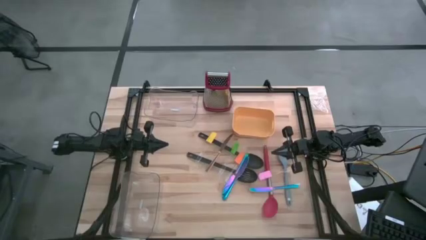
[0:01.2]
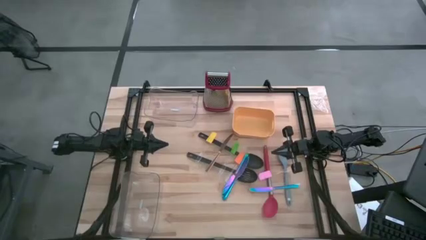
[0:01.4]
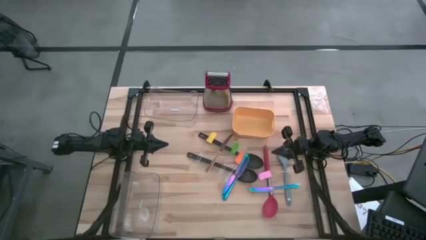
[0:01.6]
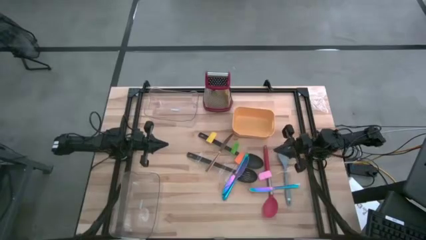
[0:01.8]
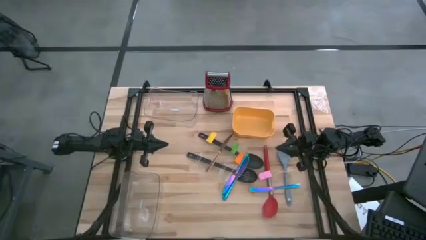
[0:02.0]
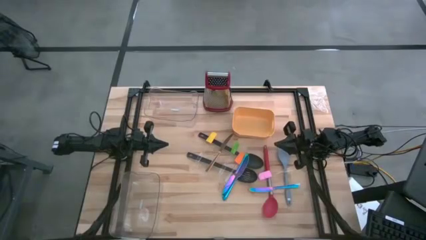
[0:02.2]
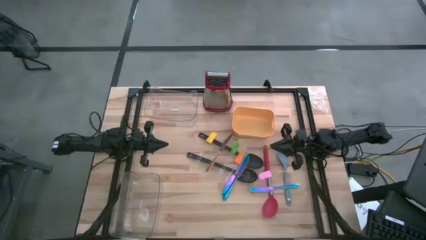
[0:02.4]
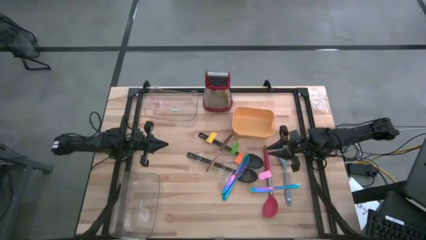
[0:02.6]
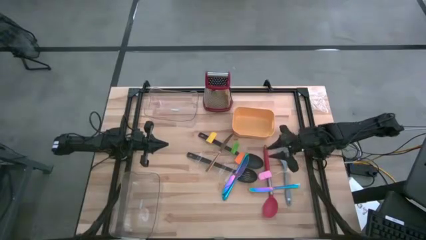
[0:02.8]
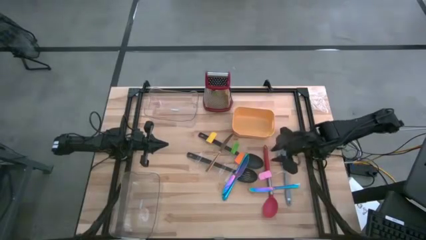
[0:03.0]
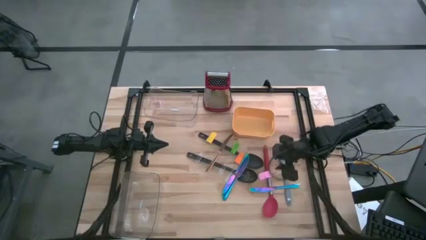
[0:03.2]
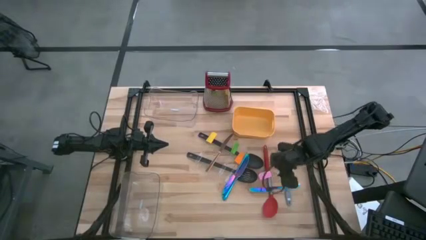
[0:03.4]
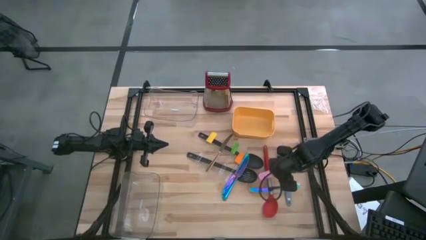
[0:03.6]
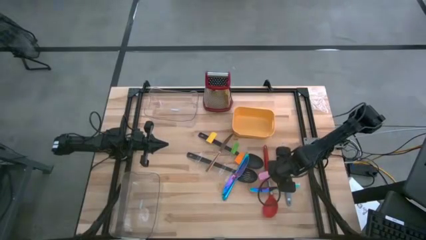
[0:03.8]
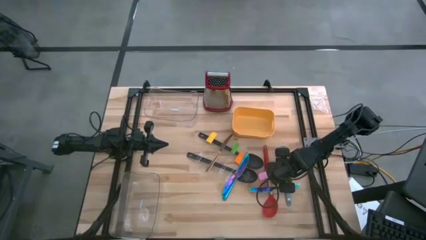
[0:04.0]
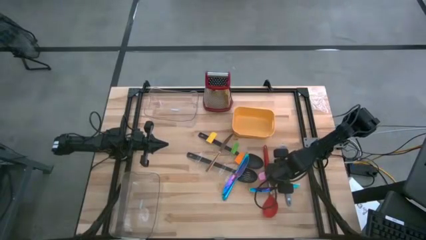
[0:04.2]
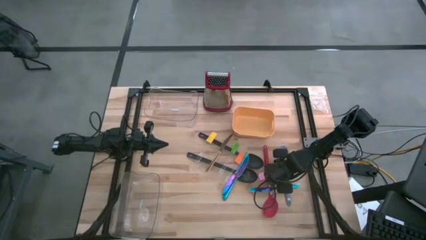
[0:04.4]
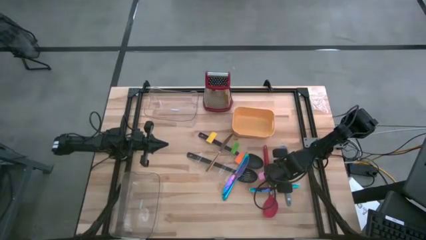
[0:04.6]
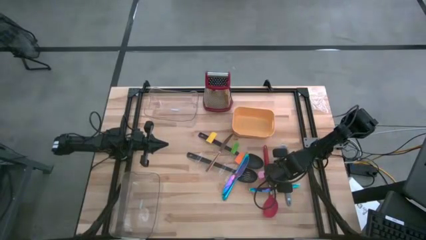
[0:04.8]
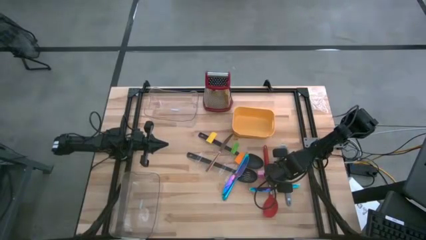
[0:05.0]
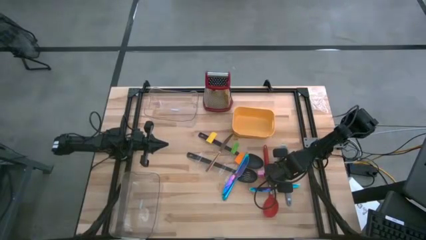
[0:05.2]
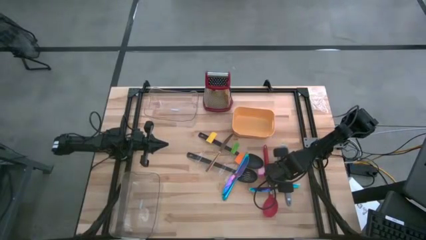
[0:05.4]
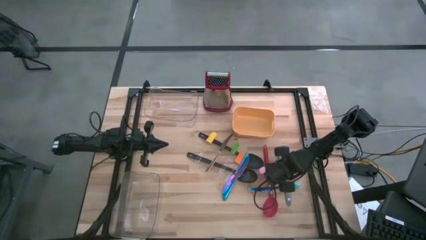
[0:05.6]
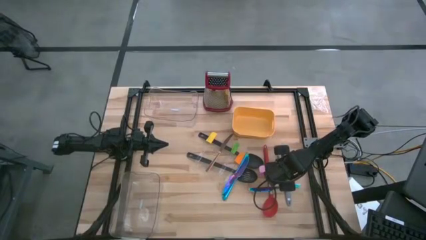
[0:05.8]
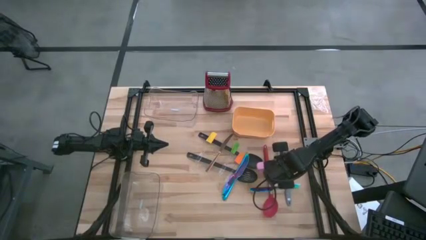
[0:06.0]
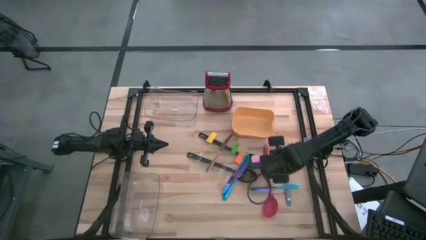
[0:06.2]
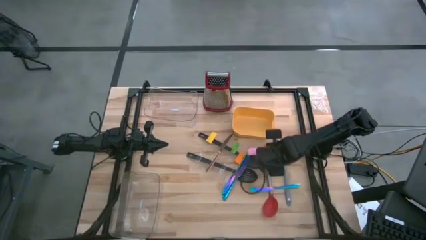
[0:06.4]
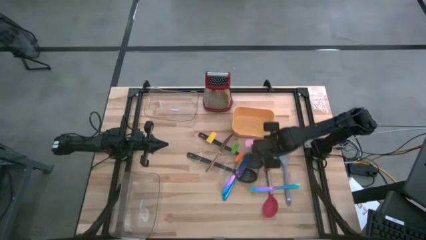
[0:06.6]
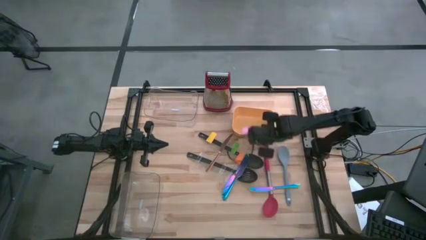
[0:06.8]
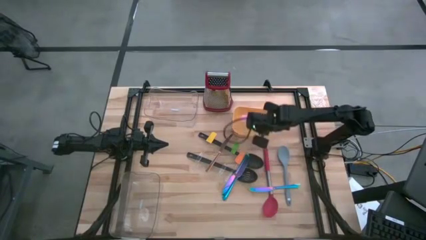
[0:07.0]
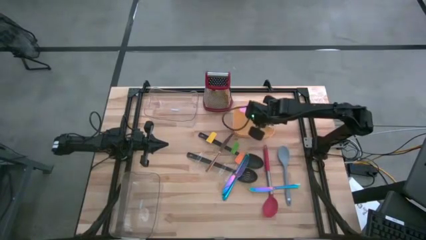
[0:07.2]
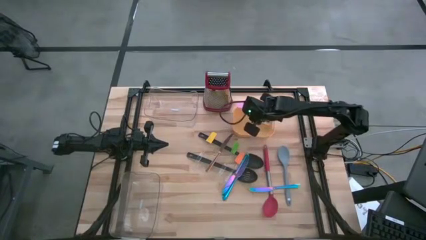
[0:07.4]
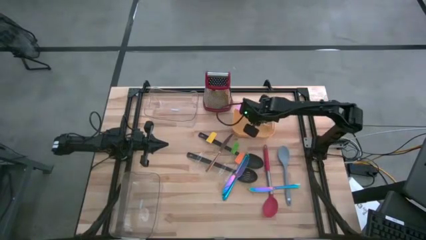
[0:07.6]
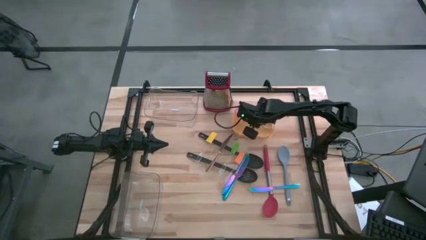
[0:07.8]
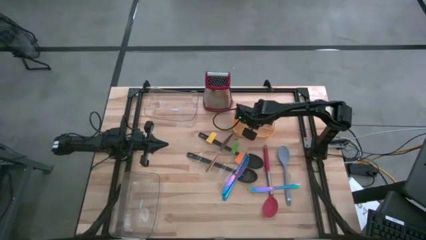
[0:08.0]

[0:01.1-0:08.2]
Task: Pick & Place Kitchen Items
Put the pink spatula into the yellow bin

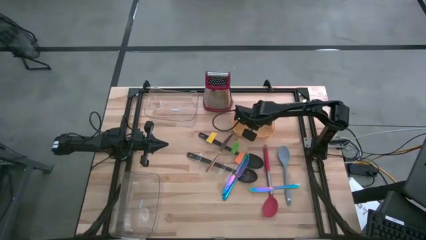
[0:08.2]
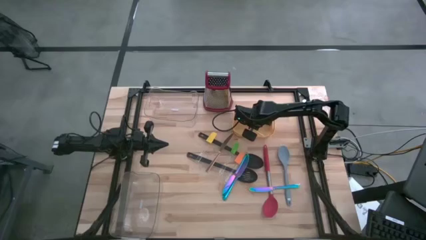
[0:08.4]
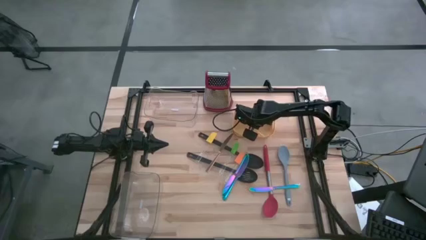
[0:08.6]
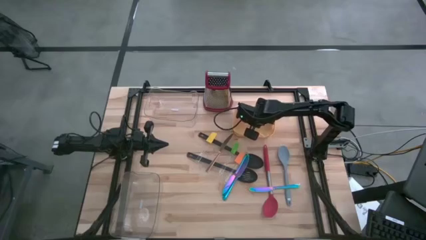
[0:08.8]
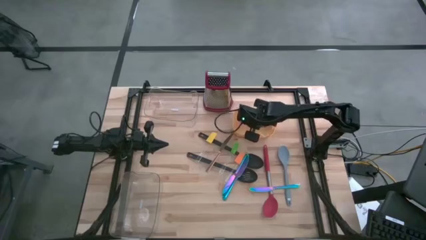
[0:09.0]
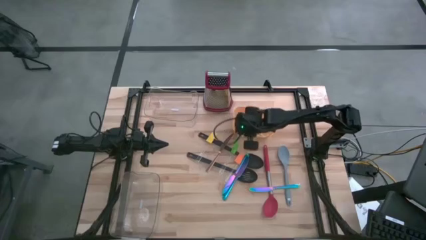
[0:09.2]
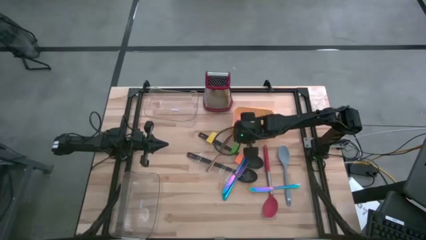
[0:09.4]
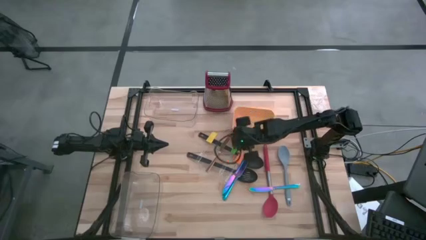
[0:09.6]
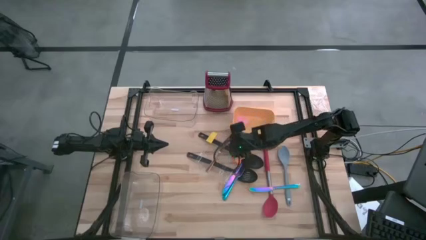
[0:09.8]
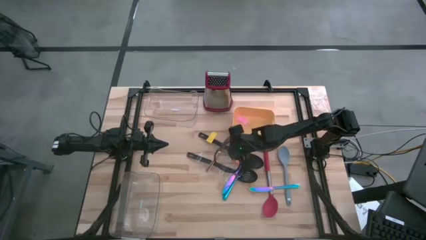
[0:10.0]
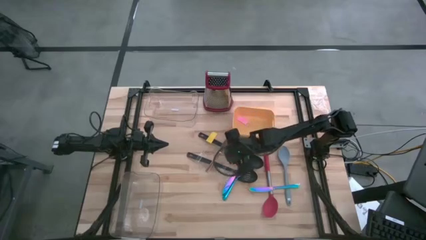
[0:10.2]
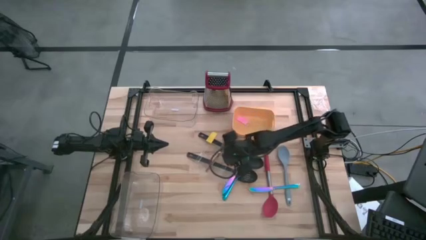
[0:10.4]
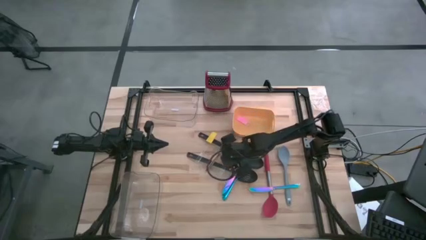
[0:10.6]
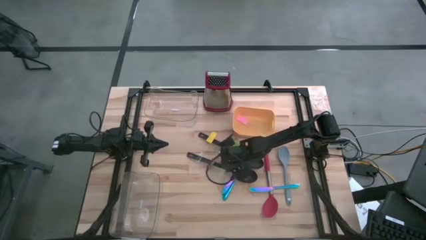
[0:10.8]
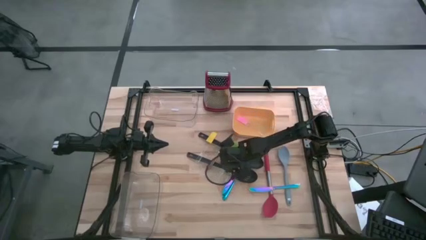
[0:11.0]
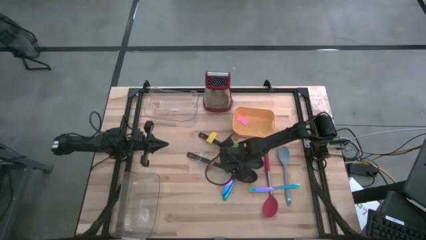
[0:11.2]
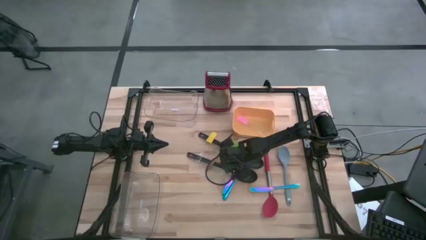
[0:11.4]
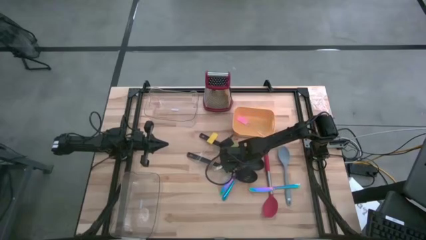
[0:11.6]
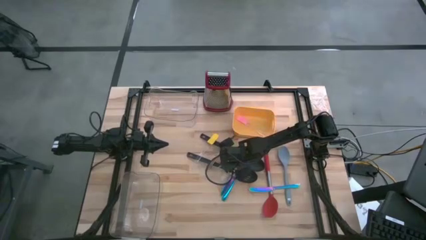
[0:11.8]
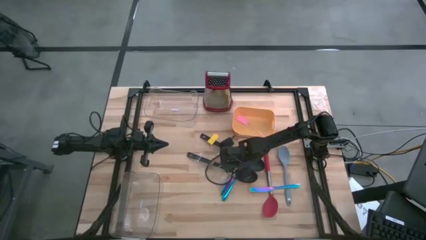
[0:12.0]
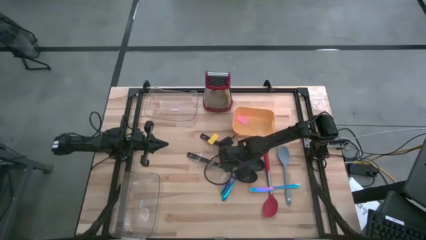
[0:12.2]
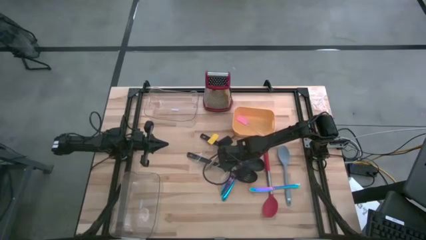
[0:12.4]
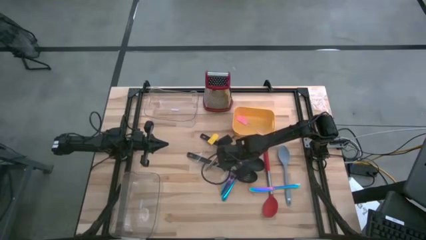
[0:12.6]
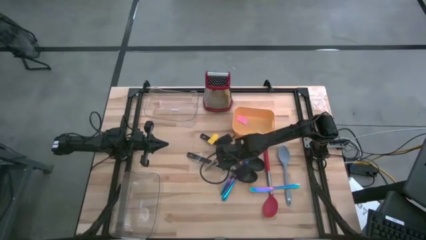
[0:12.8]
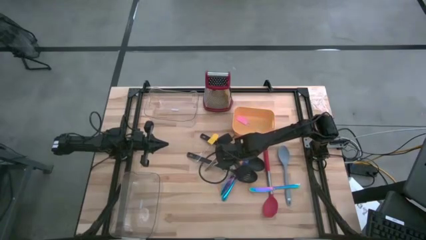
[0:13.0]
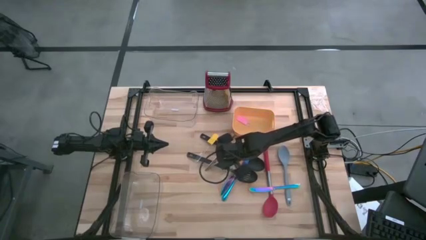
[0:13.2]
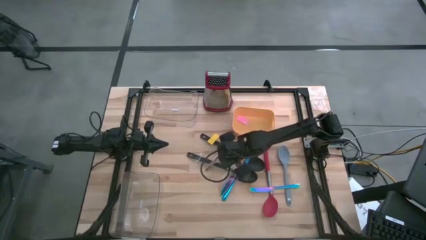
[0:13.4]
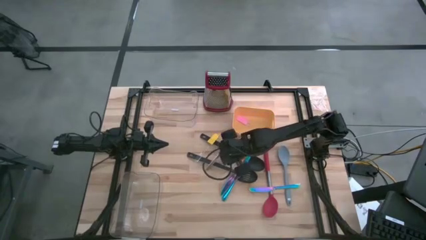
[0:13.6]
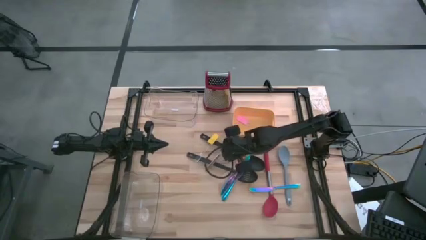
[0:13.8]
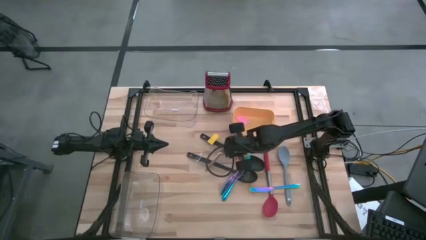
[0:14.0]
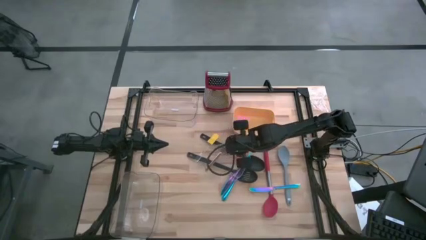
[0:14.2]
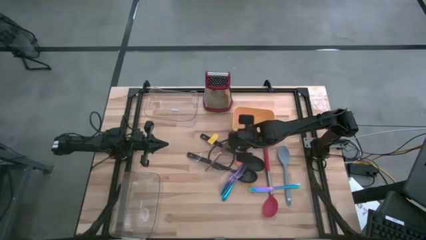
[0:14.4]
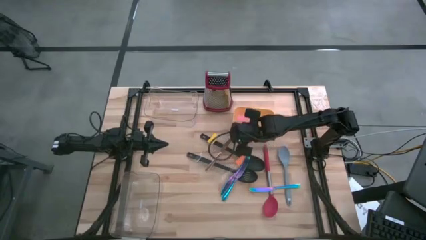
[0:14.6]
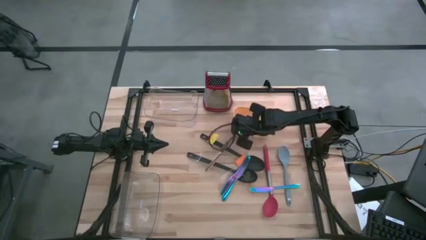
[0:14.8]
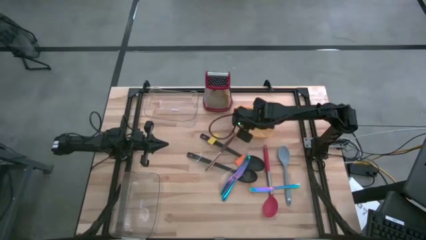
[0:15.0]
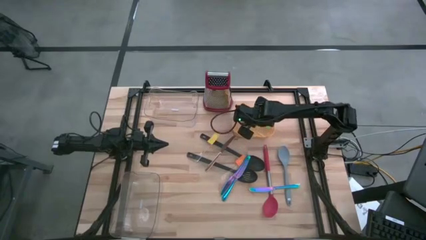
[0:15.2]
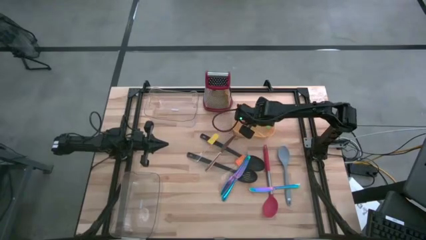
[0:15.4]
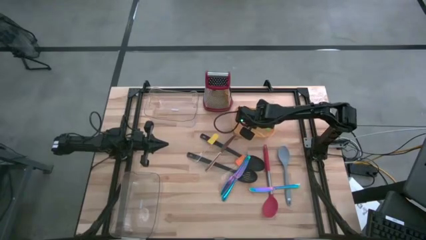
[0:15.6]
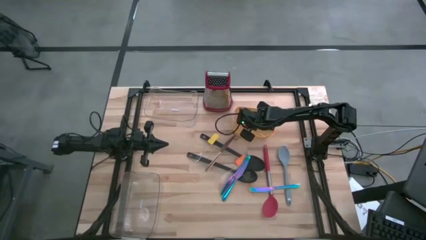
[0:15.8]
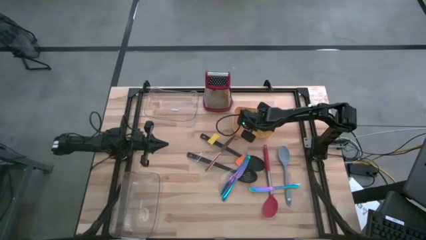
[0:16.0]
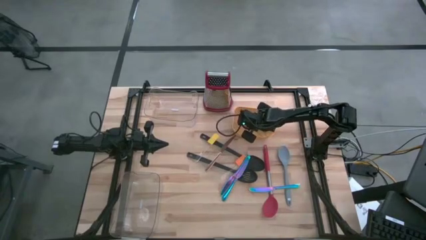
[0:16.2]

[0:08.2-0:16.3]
Put the green spatula into the yellow bin

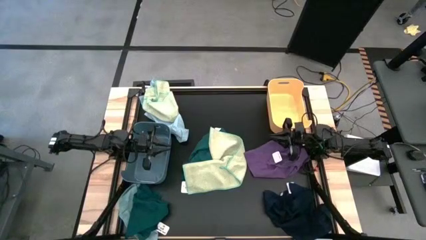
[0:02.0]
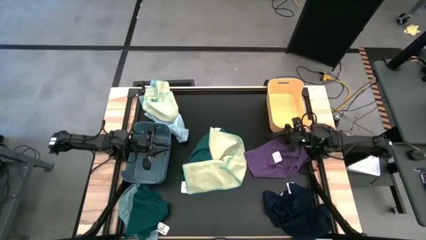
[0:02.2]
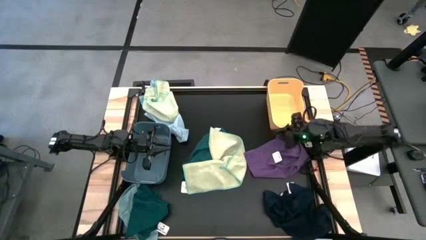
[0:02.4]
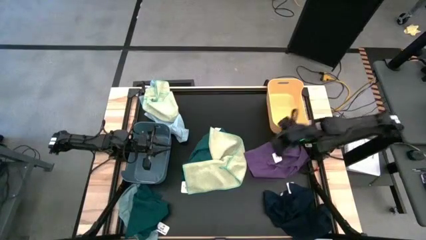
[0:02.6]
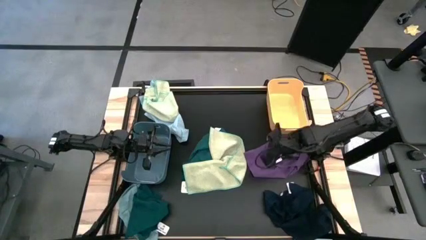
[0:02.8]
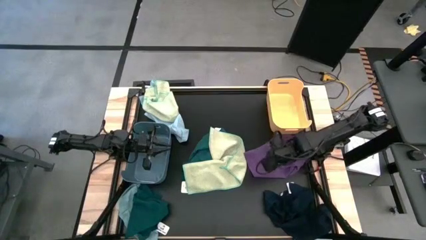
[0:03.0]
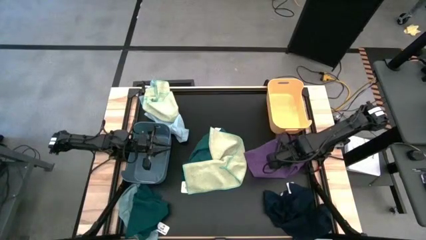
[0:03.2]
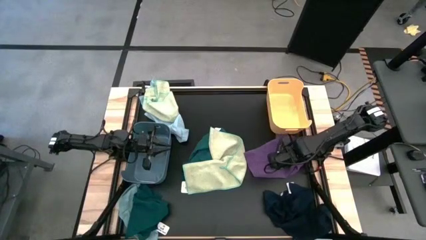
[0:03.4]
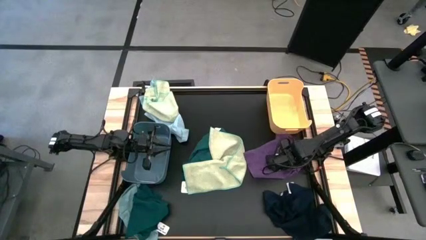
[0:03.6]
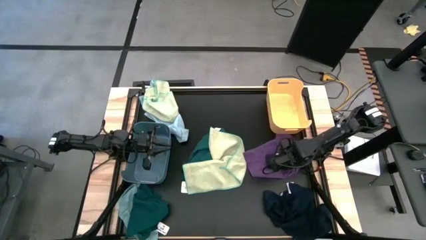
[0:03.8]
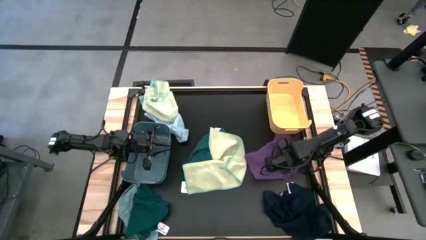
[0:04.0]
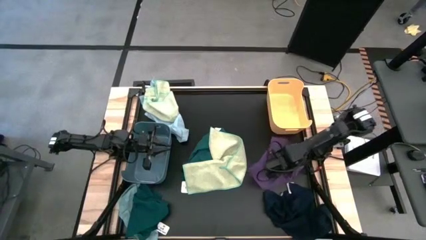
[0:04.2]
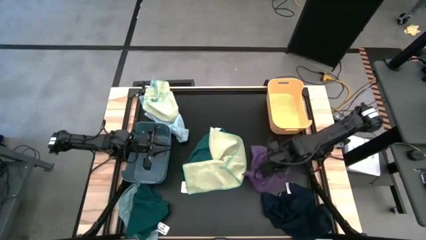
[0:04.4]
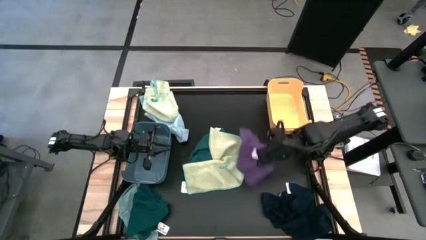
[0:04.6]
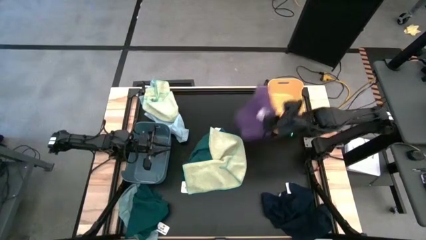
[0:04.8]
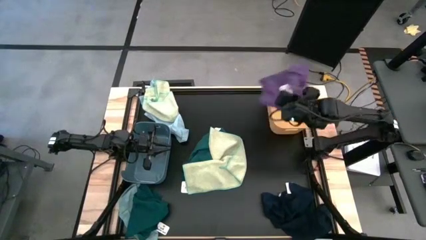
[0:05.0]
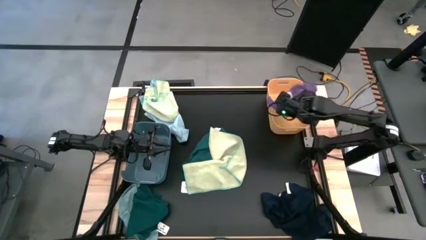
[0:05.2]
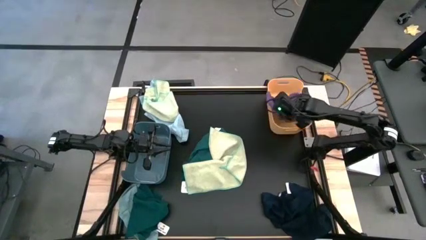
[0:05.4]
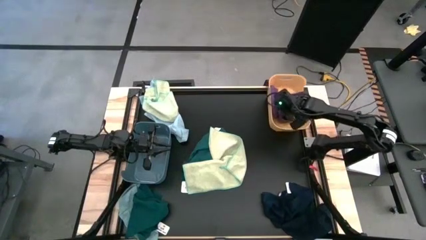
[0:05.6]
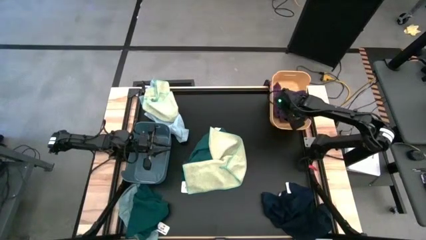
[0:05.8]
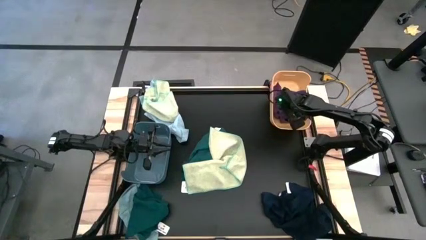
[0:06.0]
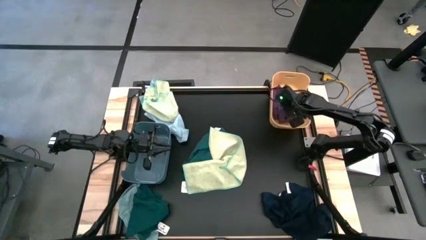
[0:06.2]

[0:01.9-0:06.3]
Task: Sort towels by color in basket
Put the violet towel into the orange bin
